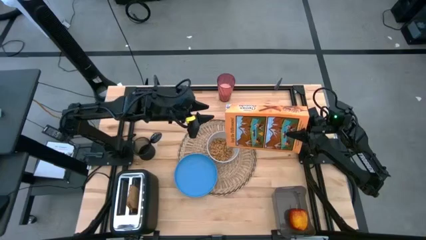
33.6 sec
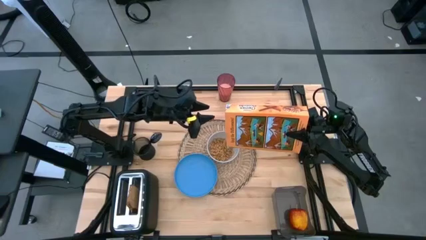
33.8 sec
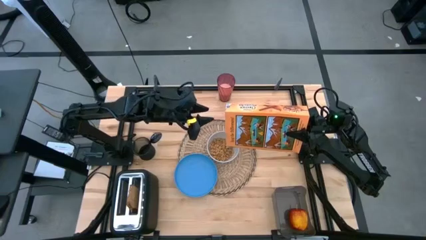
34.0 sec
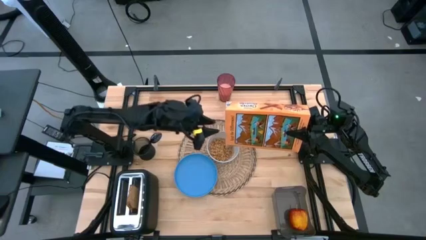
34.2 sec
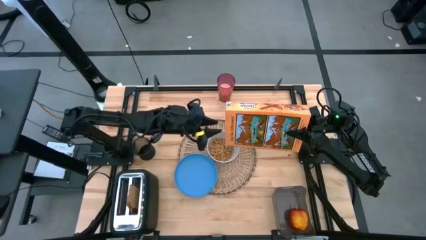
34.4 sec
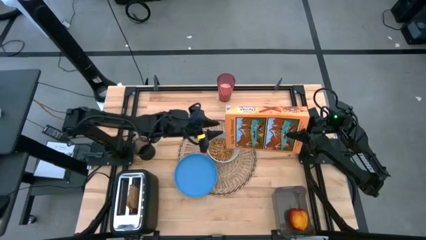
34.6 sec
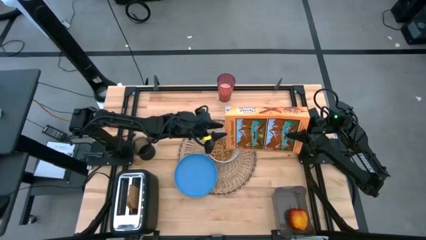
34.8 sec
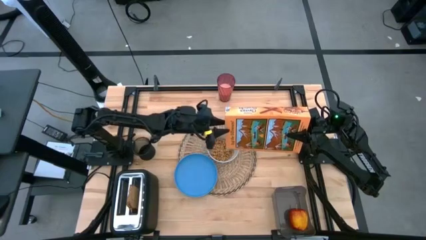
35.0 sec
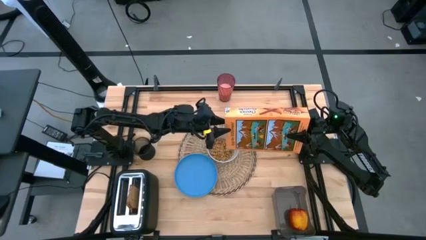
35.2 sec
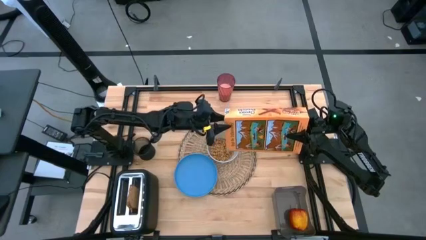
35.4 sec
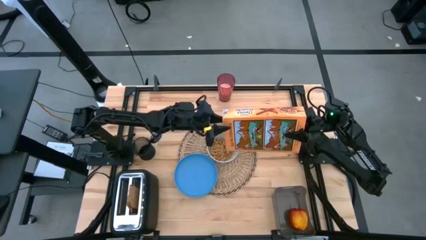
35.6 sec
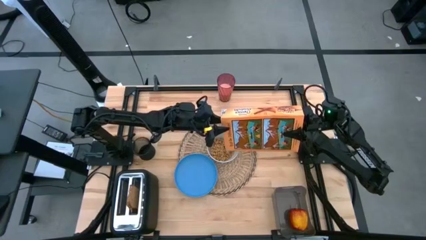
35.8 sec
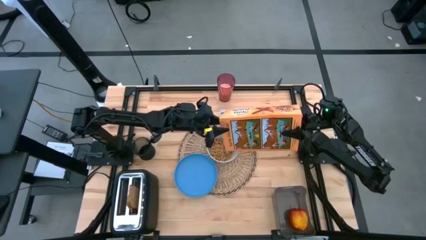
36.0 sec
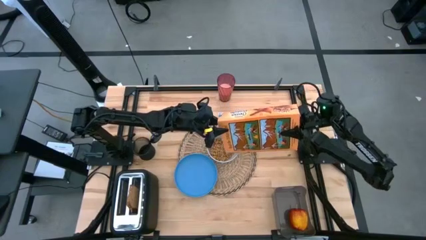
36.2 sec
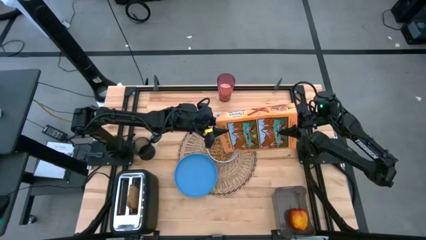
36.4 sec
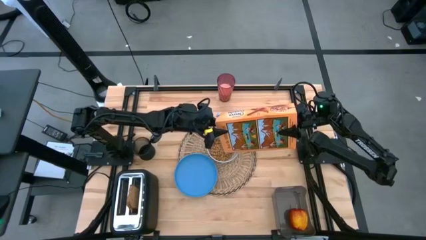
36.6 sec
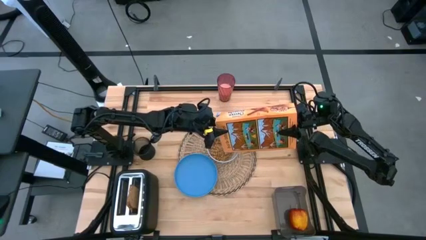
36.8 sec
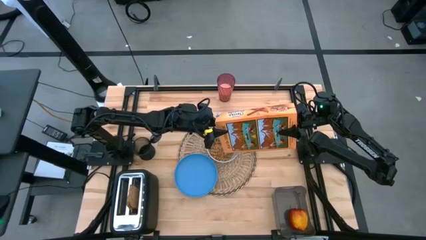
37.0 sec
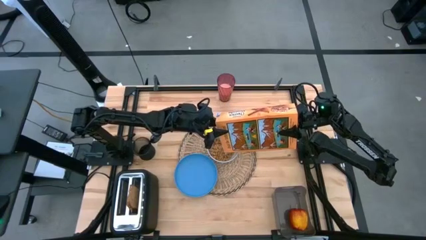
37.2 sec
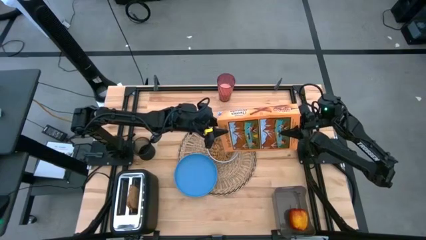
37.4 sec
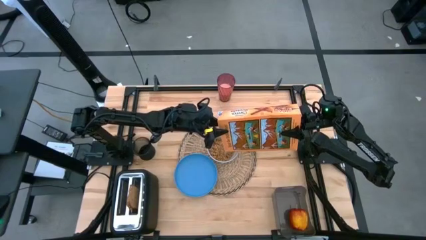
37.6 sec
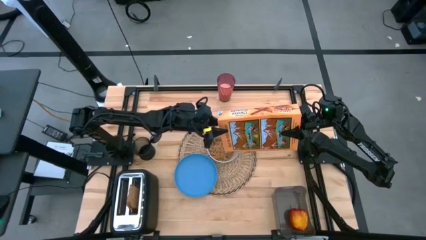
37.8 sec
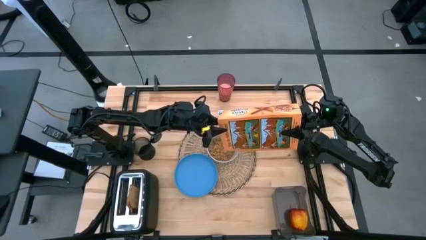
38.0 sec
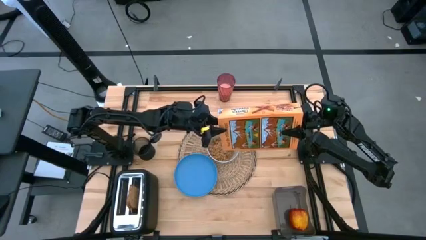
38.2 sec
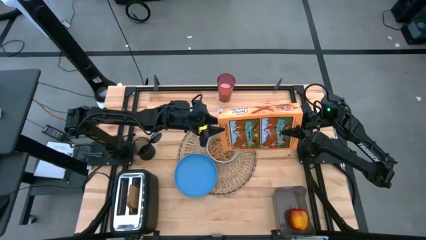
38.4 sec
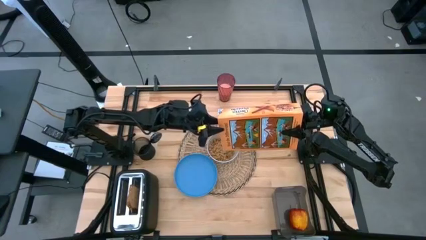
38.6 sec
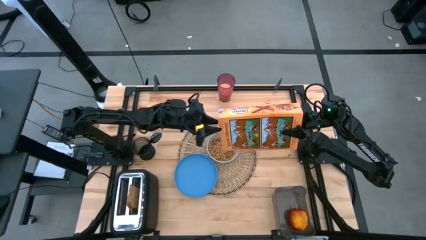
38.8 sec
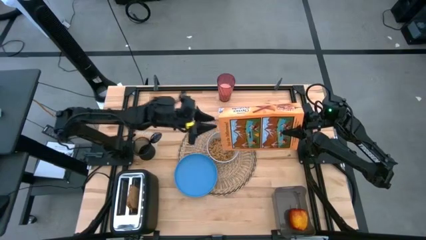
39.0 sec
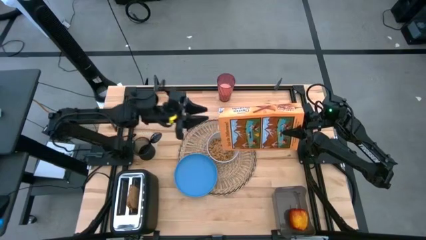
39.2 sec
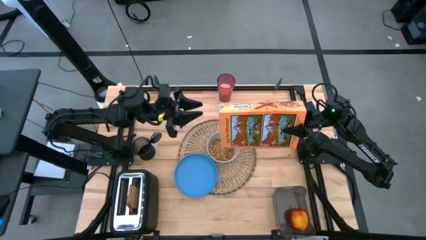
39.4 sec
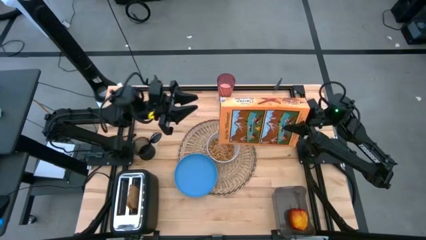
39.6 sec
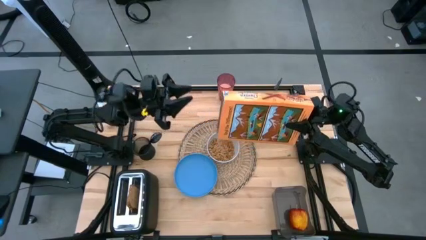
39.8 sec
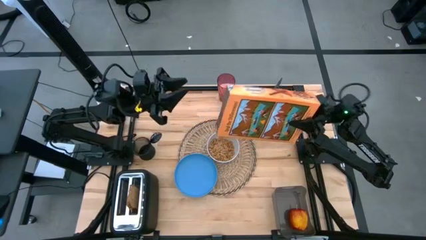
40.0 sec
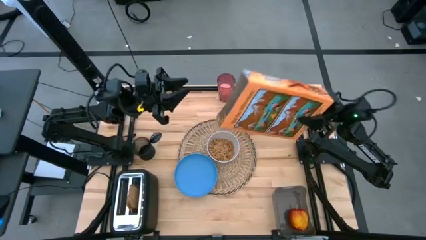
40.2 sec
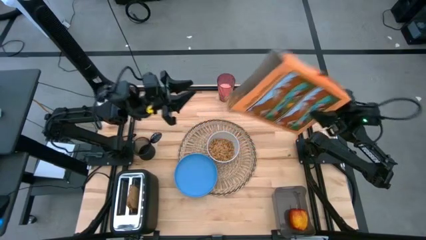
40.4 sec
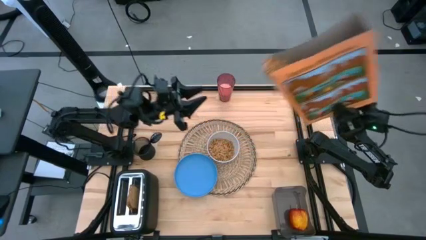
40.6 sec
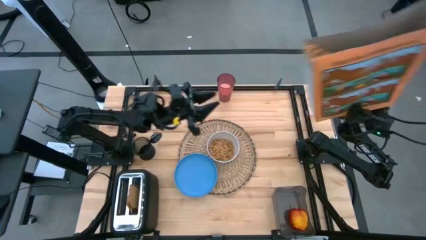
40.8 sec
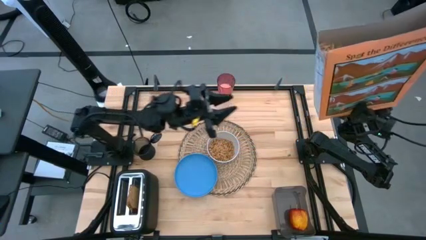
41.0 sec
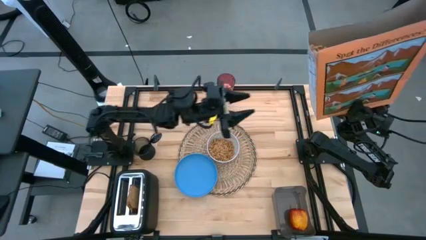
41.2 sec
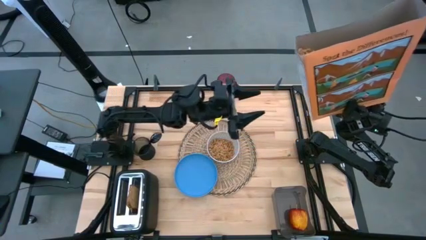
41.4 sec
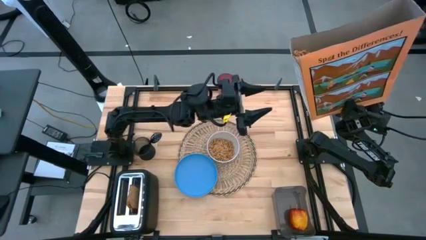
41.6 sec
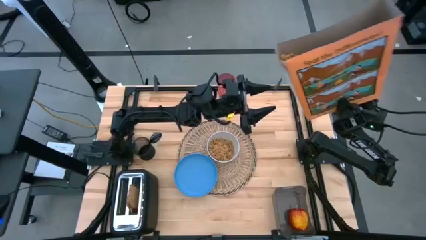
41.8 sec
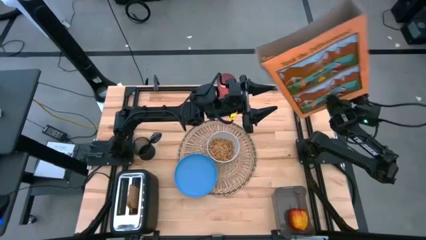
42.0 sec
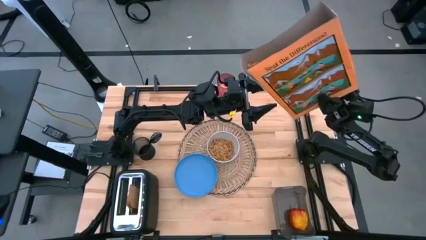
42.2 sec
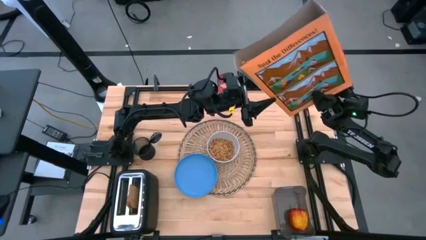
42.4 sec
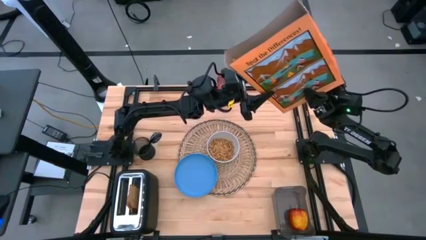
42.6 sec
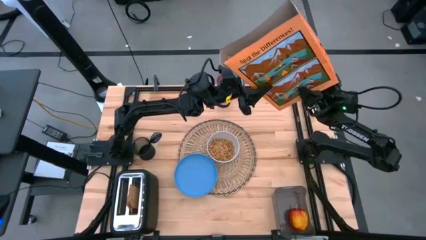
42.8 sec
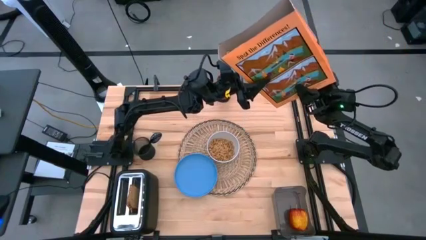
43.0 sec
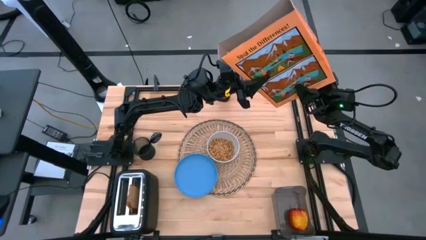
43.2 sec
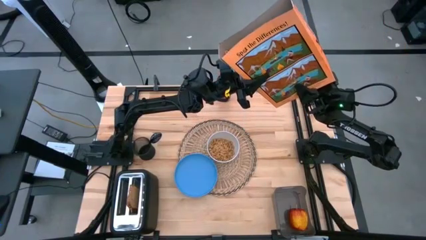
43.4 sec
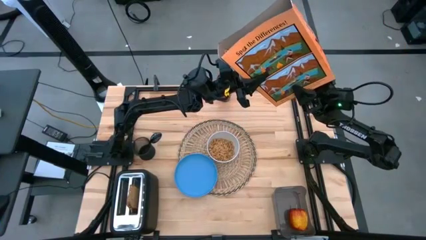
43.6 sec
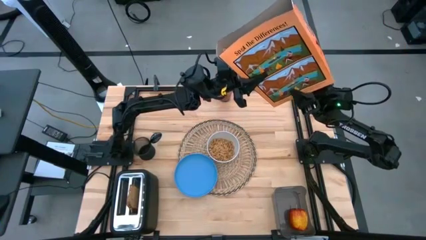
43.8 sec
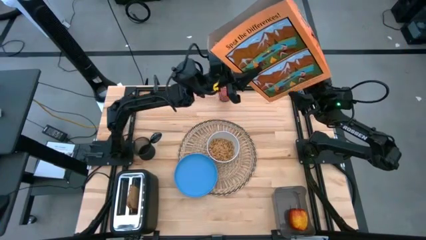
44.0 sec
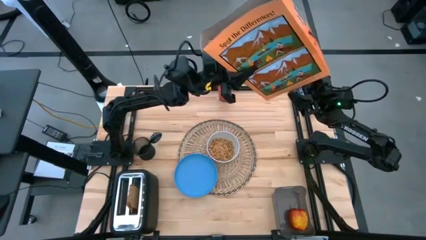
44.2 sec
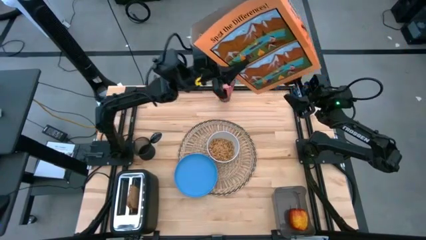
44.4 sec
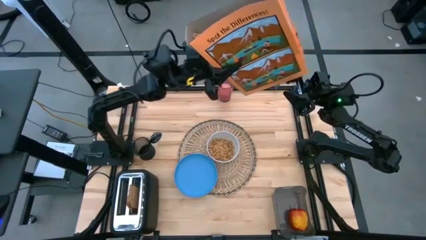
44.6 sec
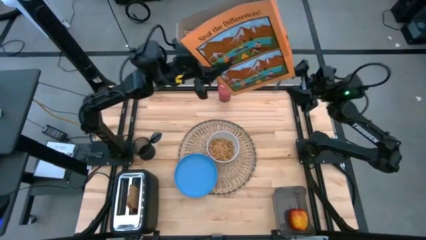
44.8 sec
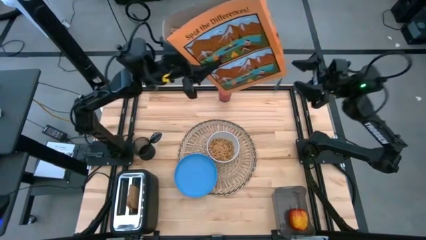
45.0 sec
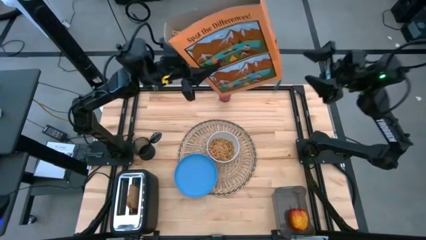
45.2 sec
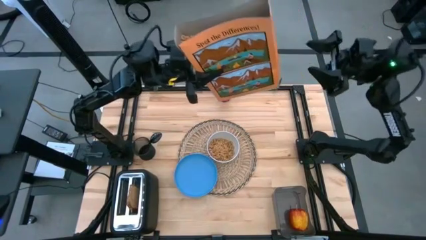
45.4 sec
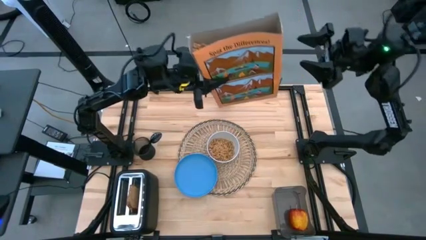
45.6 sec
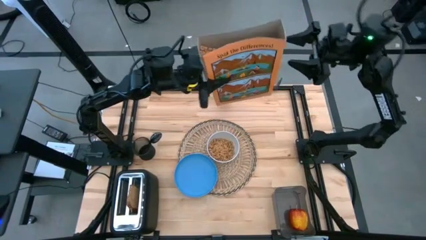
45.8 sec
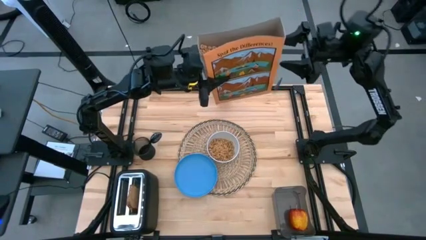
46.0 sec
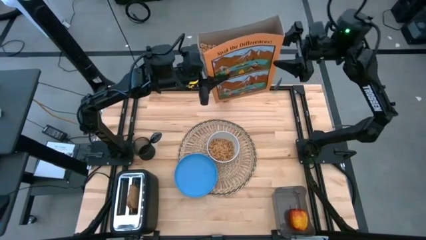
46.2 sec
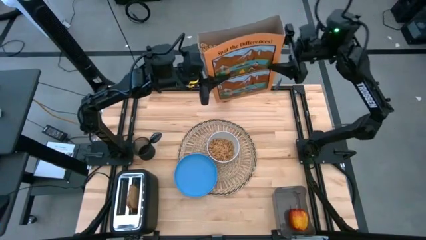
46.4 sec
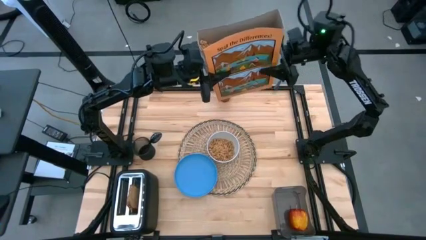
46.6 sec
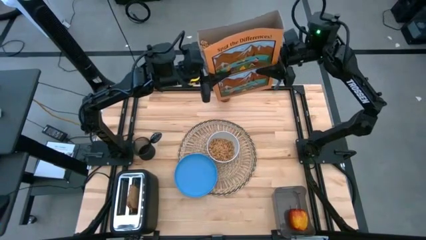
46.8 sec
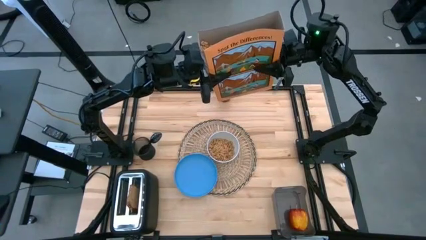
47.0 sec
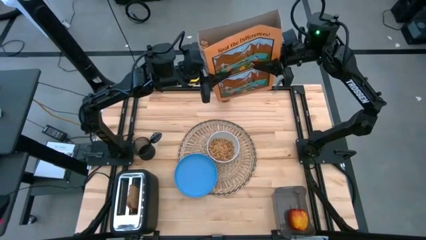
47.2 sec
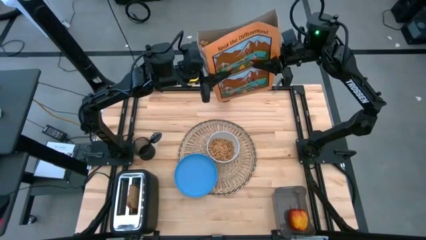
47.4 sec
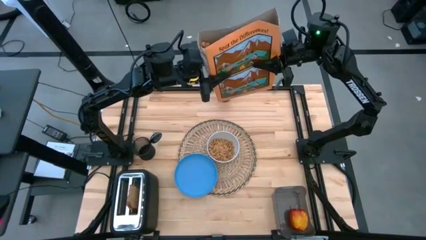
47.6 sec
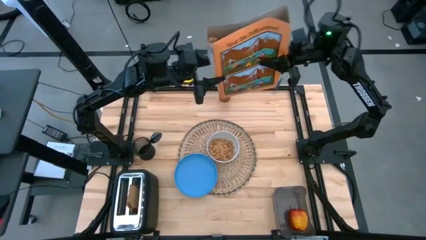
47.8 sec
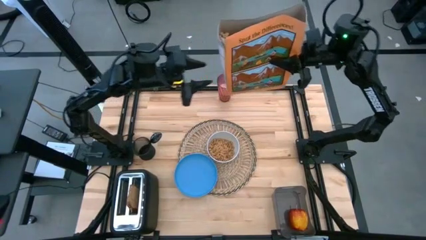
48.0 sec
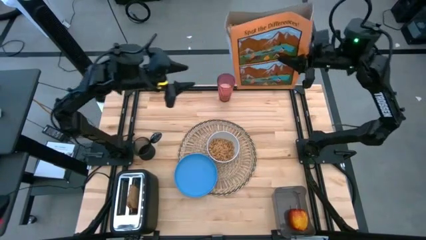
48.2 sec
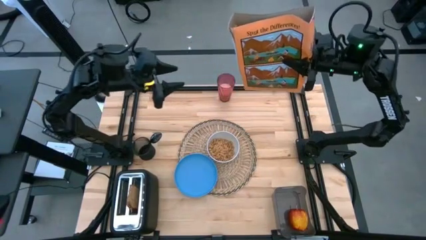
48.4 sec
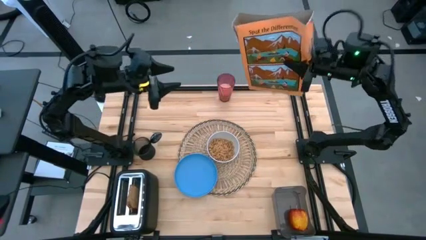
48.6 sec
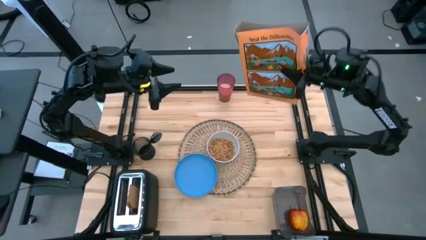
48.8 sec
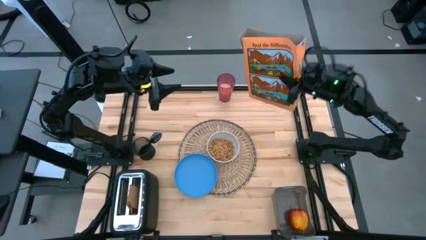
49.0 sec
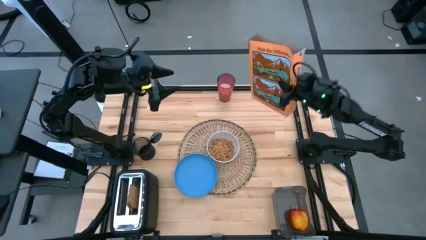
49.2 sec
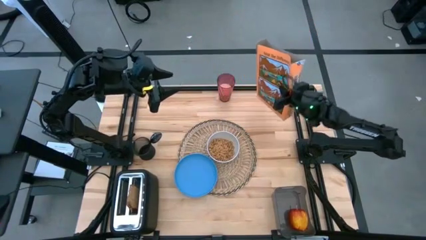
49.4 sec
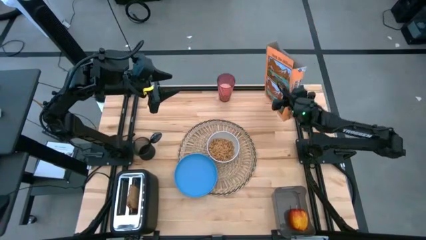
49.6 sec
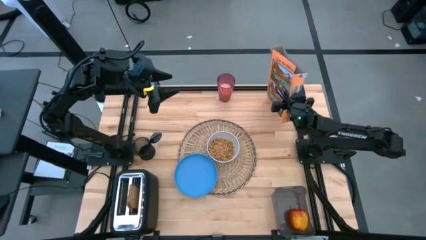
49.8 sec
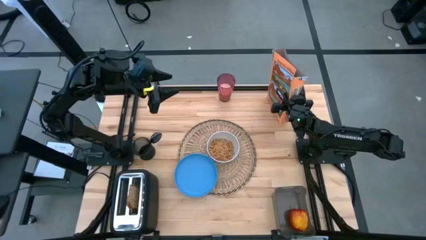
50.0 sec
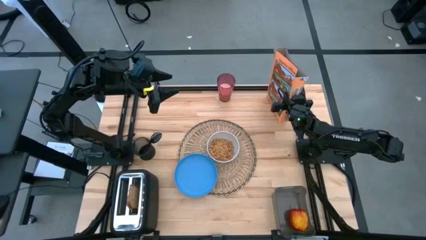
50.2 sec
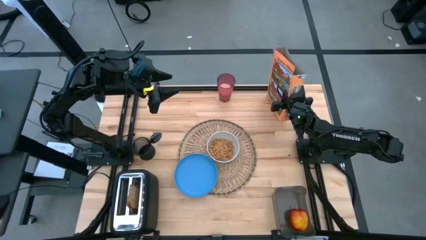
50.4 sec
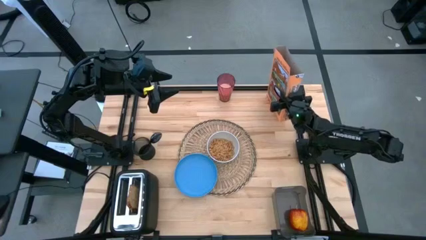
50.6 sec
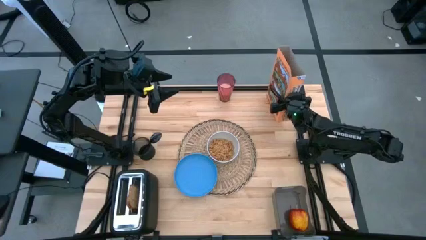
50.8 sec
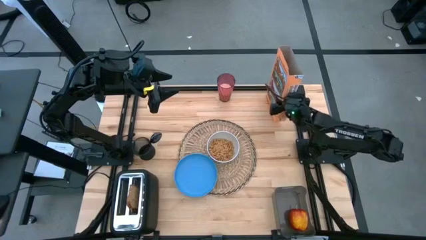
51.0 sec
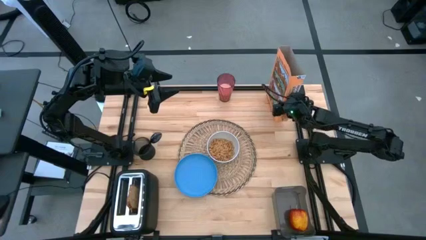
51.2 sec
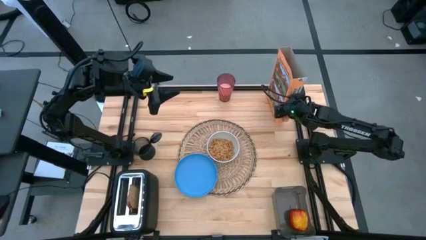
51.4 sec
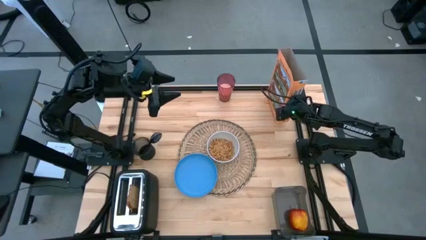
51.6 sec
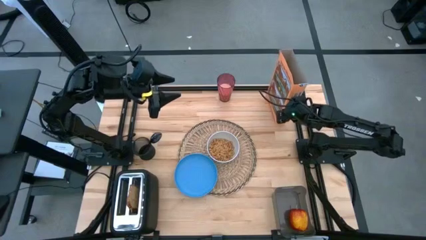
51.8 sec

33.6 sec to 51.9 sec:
Task: Arrange a breakfast setting
Pour the cereal into the white bowl
